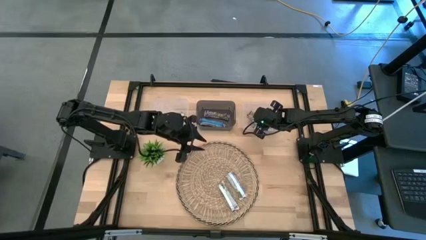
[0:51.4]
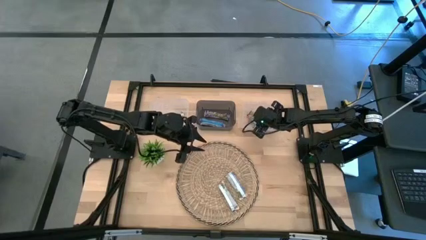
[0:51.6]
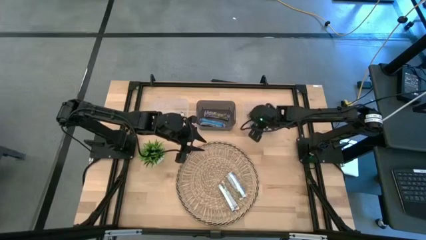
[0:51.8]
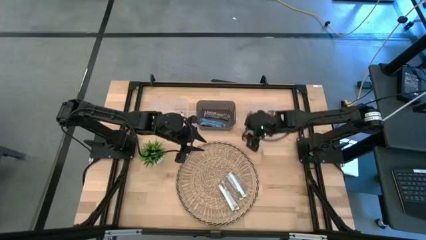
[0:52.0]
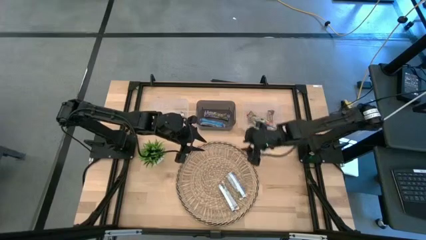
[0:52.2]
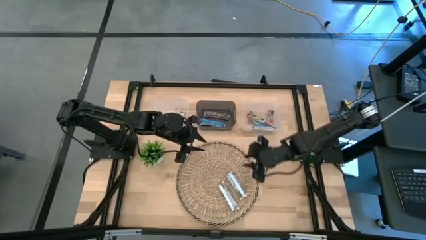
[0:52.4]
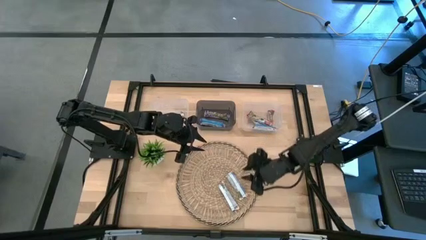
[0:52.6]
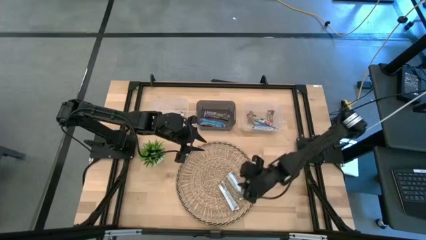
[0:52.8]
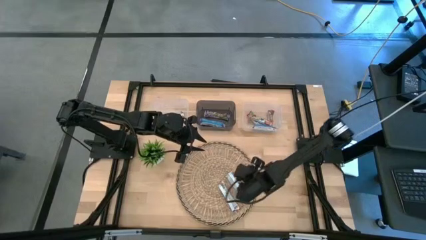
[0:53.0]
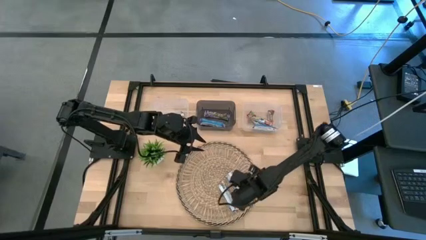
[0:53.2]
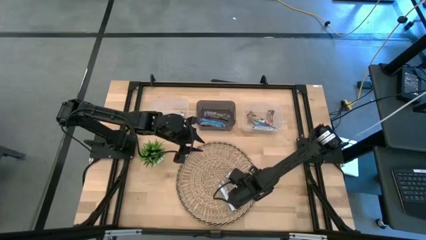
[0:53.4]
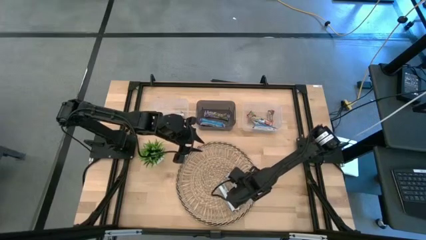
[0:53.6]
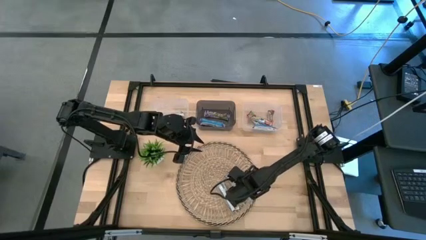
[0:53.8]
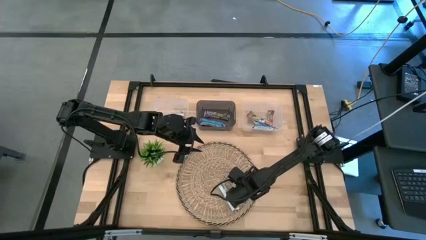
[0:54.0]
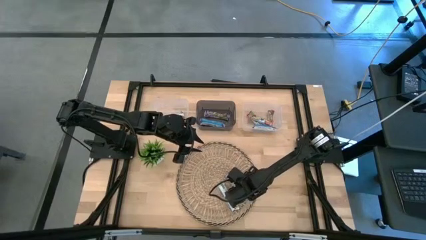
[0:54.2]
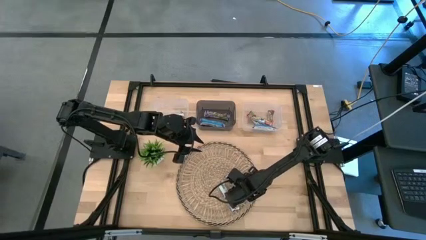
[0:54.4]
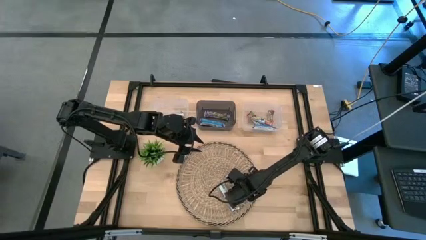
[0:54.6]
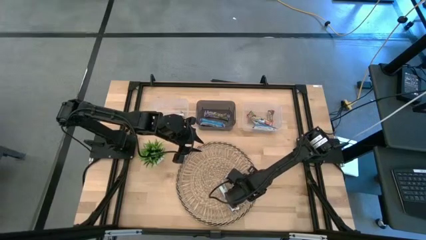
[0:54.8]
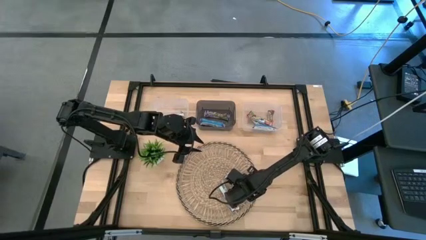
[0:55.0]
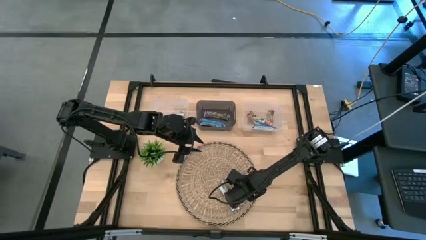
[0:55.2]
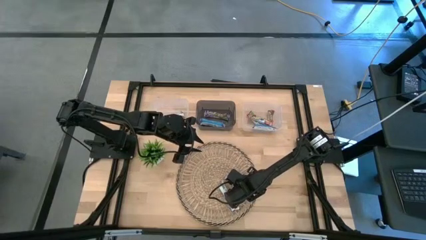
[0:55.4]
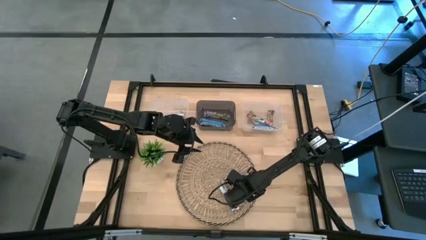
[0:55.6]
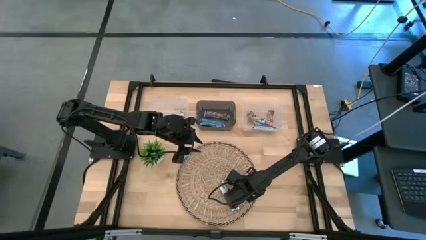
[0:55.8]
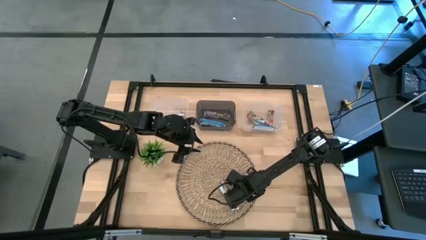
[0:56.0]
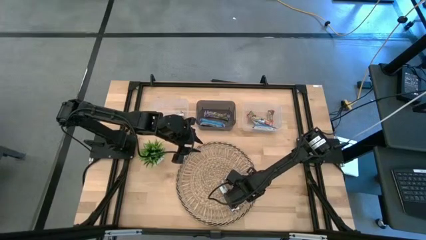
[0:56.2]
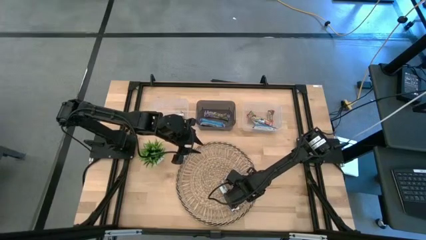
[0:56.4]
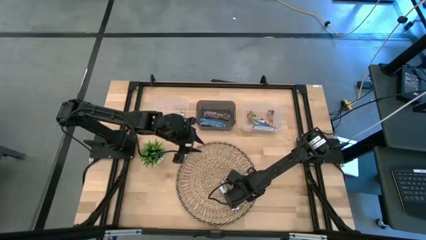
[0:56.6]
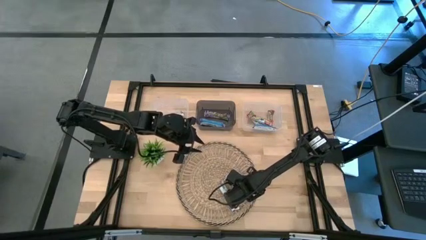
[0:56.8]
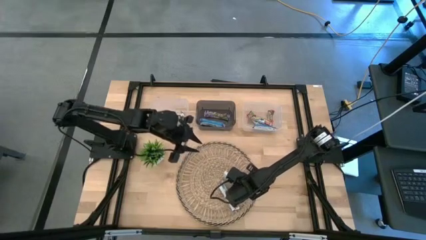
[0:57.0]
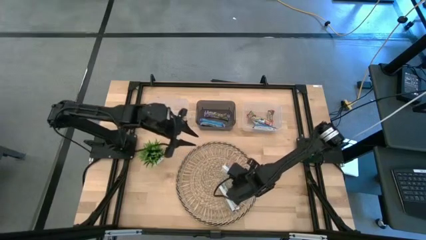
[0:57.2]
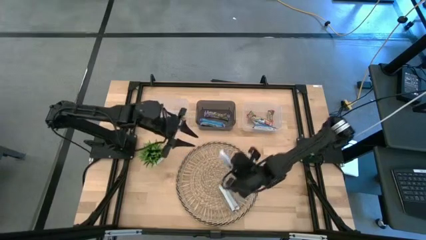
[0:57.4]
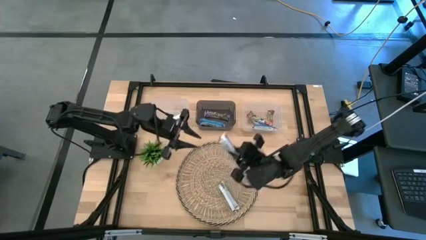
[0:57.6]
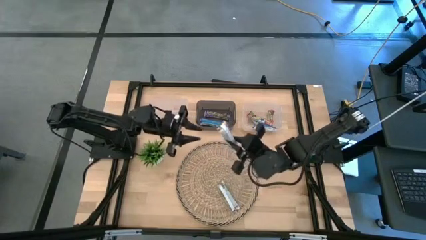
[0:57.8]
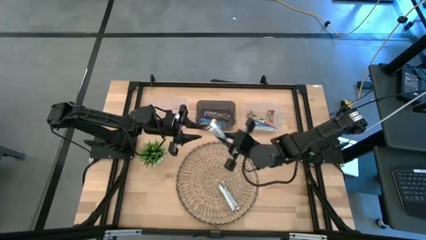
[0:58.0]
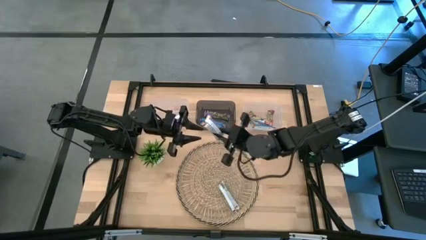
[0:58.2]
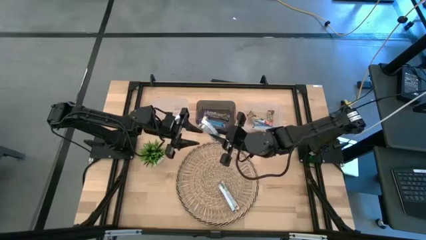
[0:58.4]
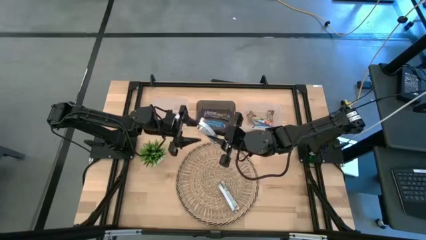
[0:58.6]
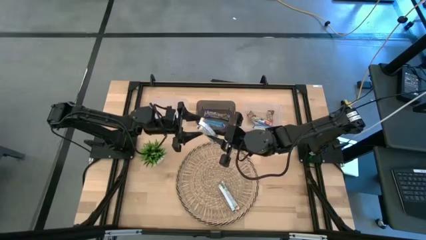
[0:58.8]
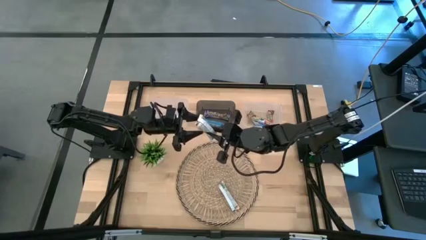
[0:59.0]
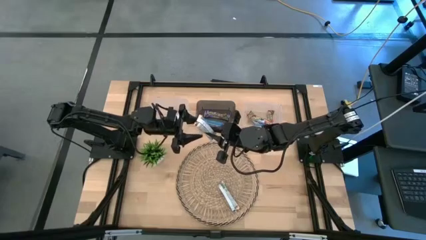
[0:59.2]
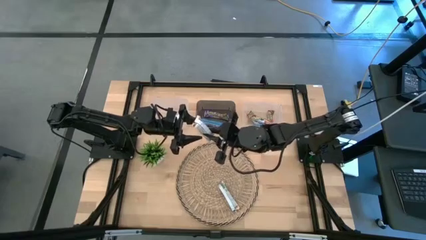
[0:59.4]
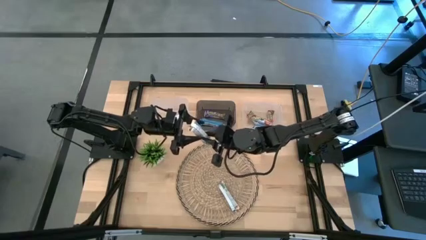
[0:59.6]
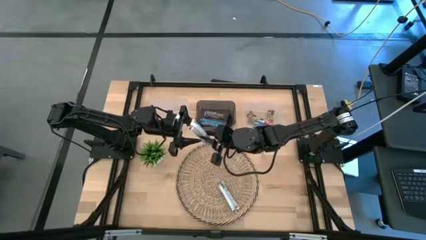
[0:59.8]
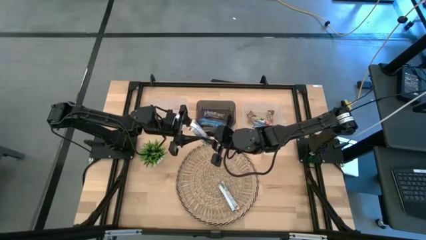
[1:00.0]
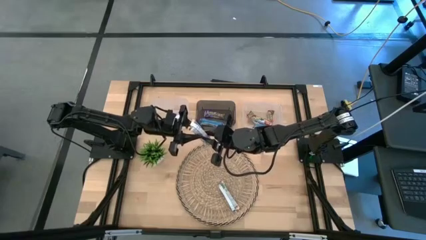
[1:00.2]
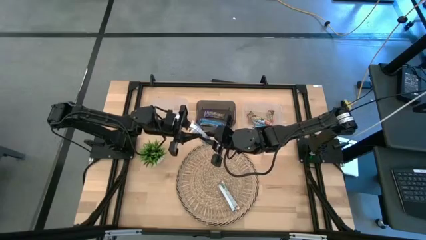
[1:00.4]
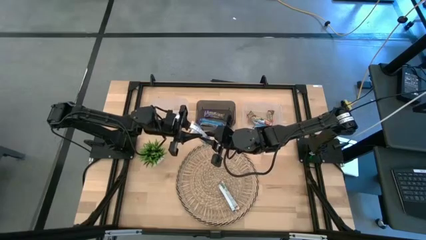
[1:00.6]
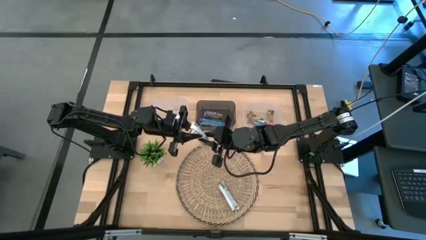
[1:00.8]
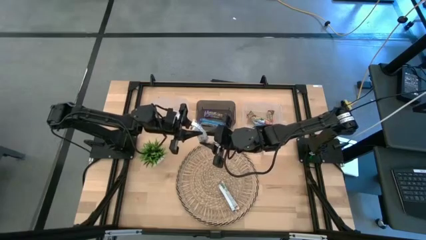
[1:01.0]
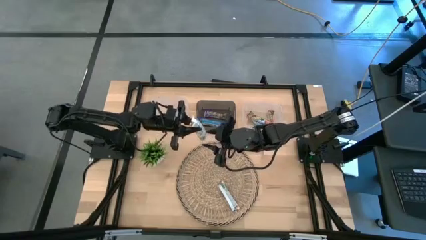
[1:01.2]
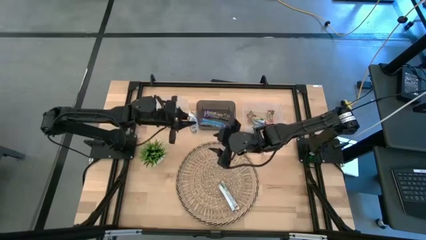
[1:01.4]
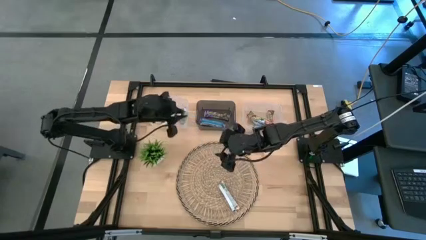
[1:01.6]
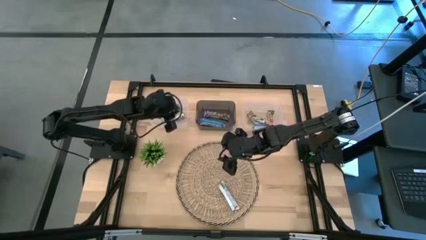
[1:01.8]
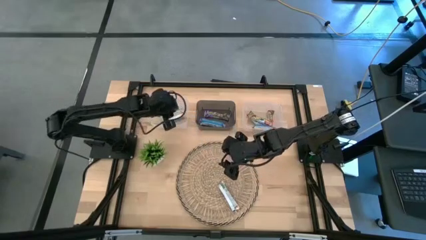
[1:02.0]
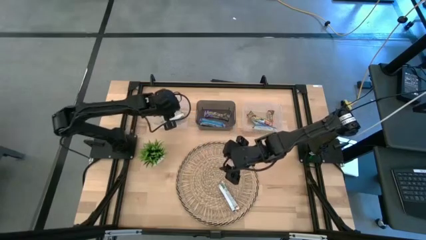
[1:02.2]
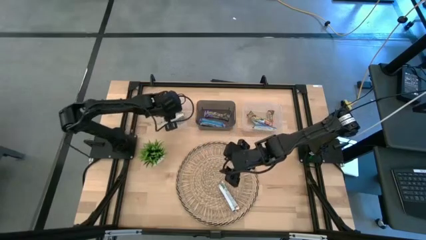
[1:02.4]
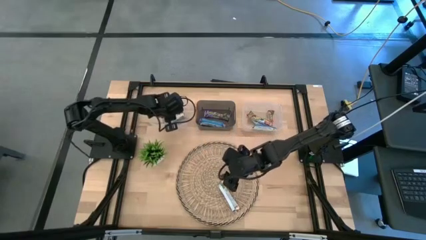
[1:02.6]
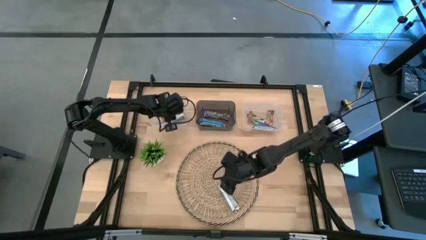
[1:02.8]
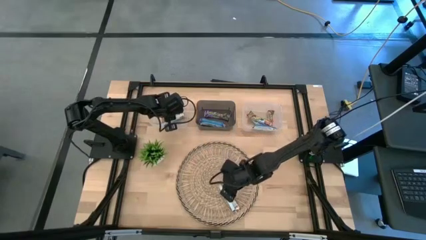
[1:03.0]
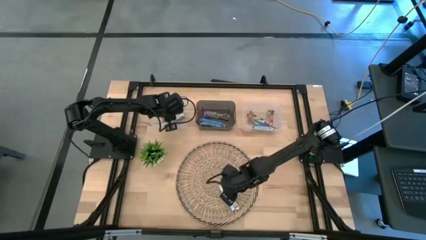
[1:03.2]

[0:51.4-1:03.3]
Task: Pick and place Granola Bars by type
Put the yellow granola bar into the left transparent bin
